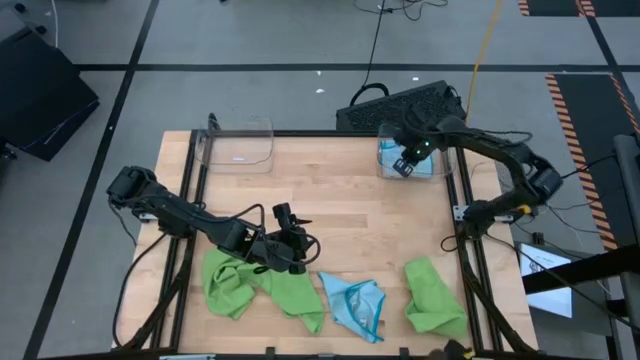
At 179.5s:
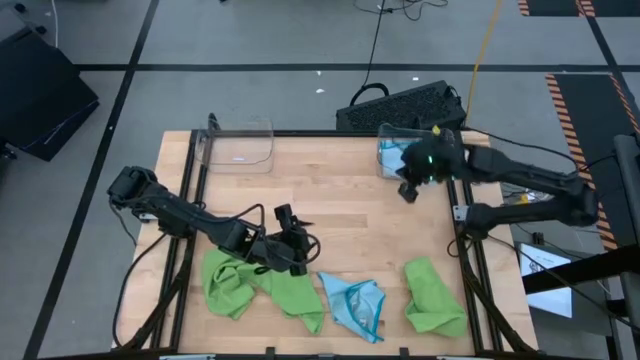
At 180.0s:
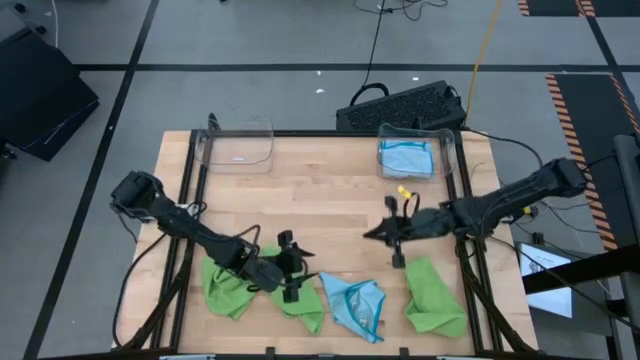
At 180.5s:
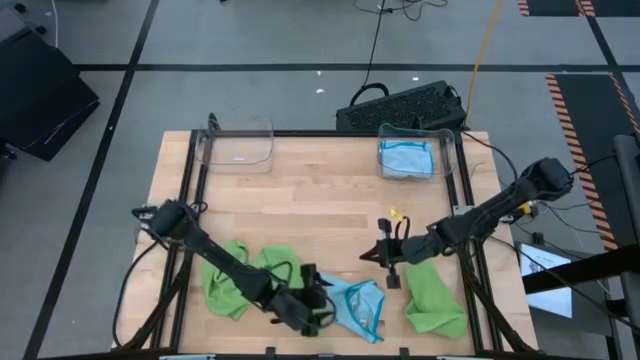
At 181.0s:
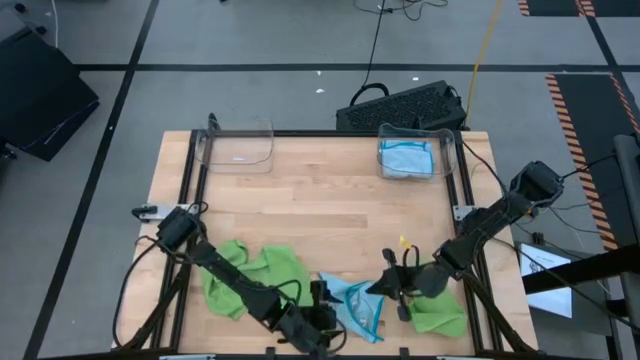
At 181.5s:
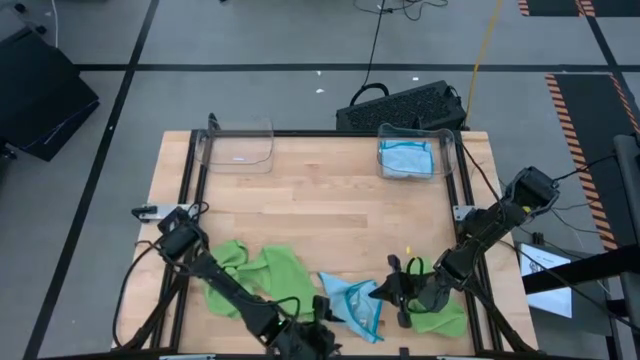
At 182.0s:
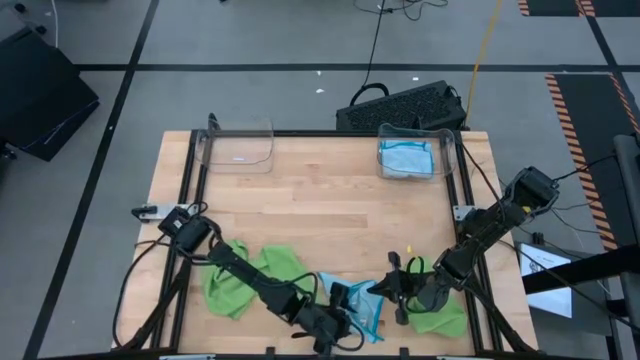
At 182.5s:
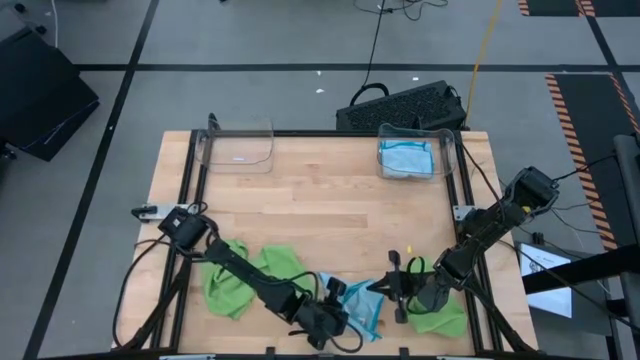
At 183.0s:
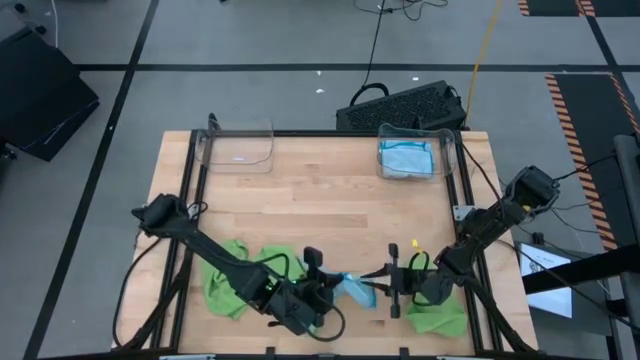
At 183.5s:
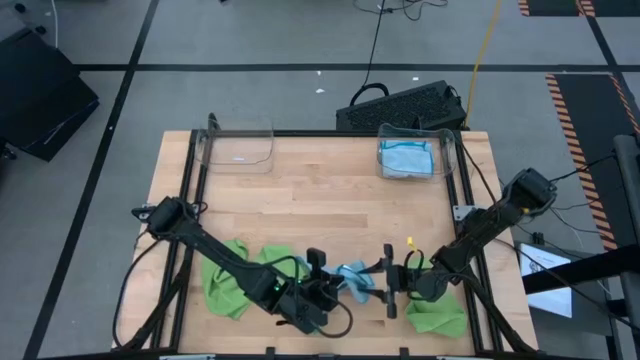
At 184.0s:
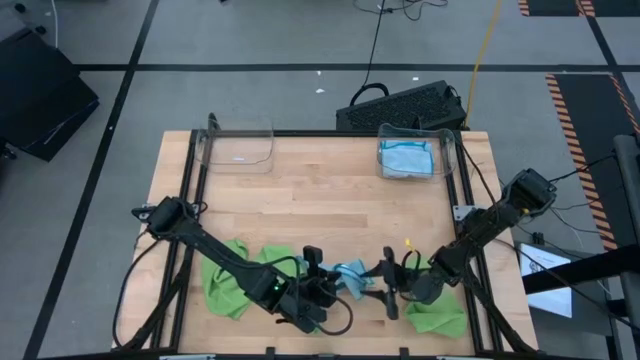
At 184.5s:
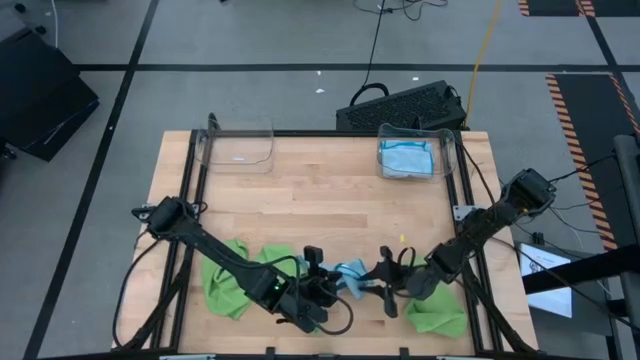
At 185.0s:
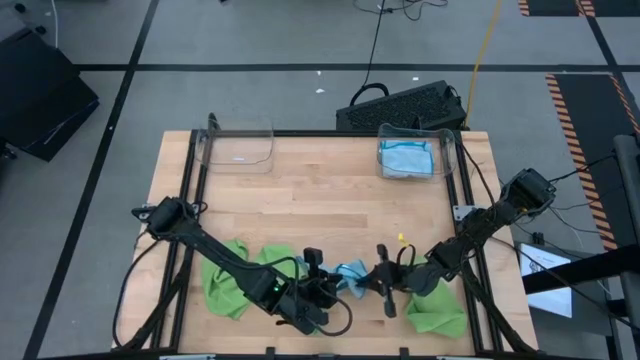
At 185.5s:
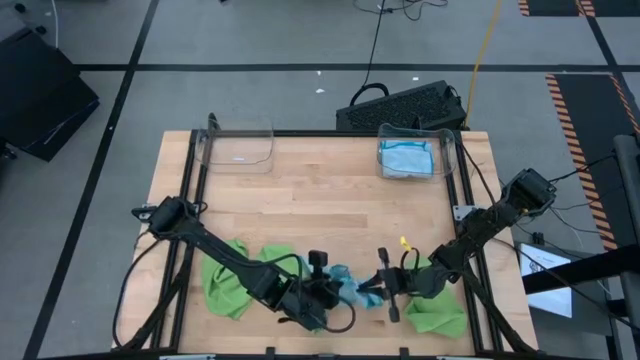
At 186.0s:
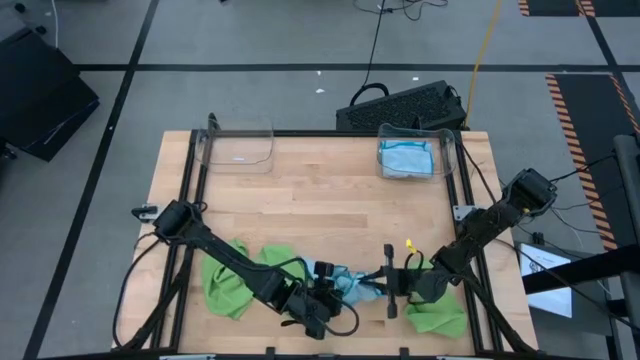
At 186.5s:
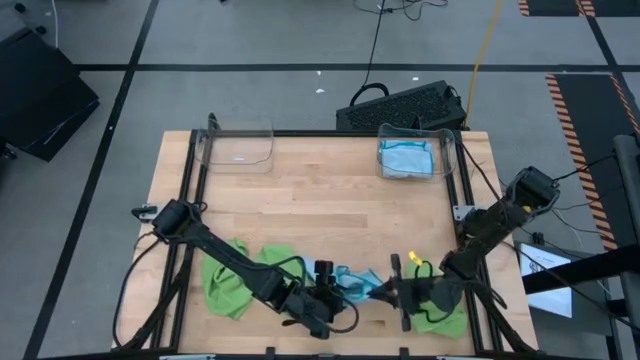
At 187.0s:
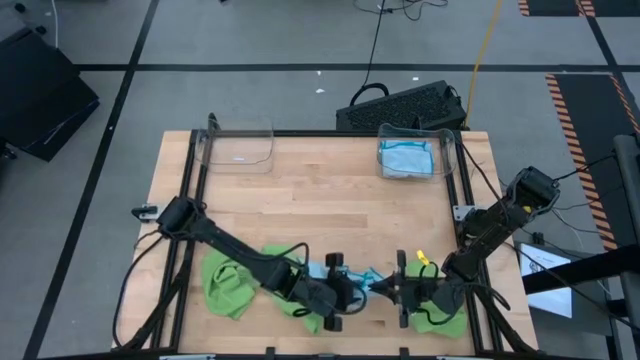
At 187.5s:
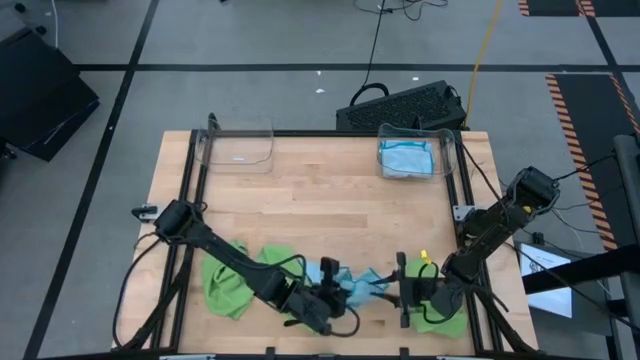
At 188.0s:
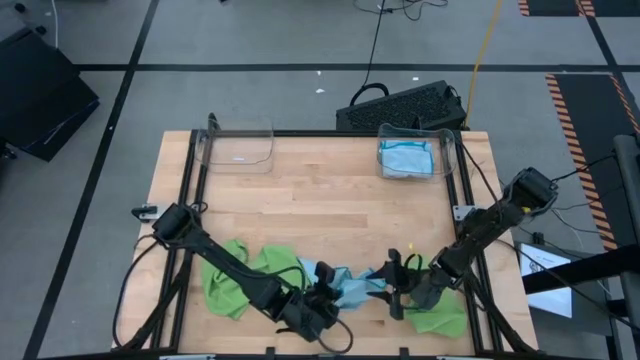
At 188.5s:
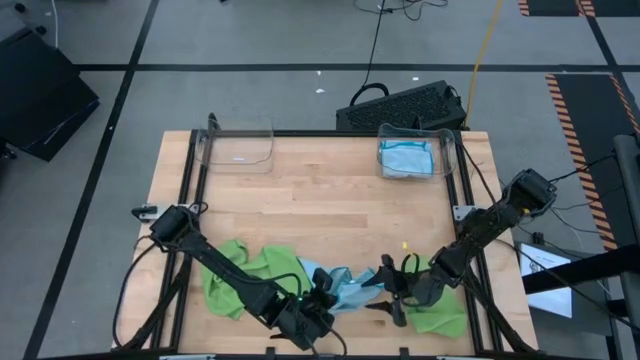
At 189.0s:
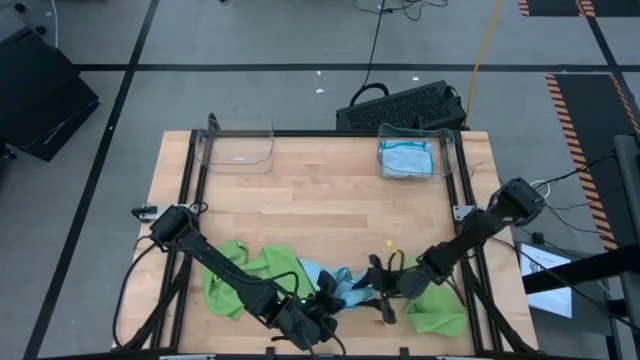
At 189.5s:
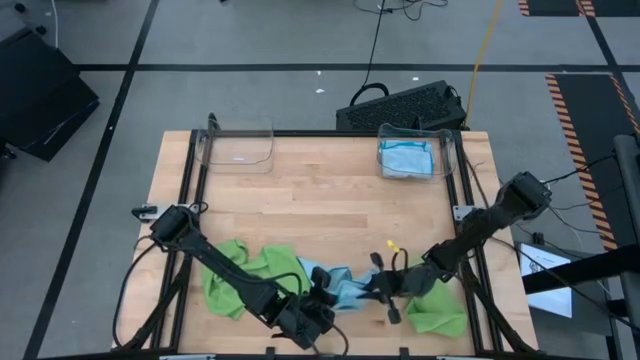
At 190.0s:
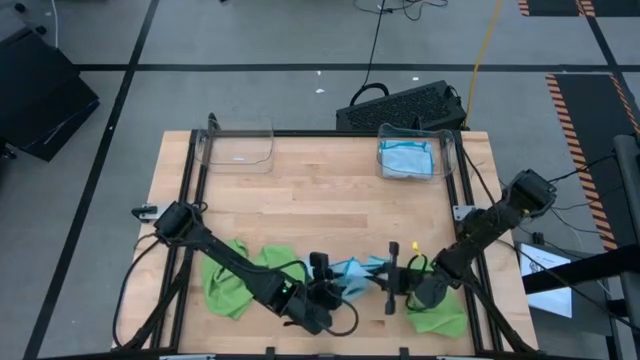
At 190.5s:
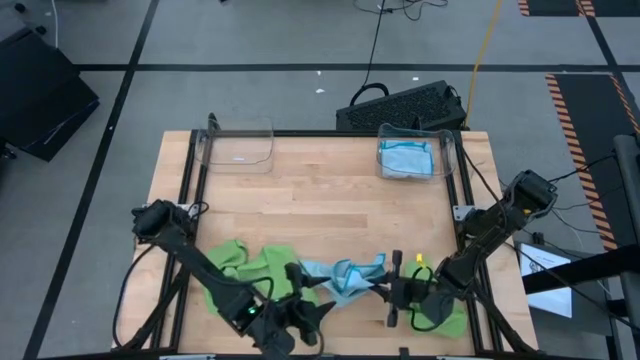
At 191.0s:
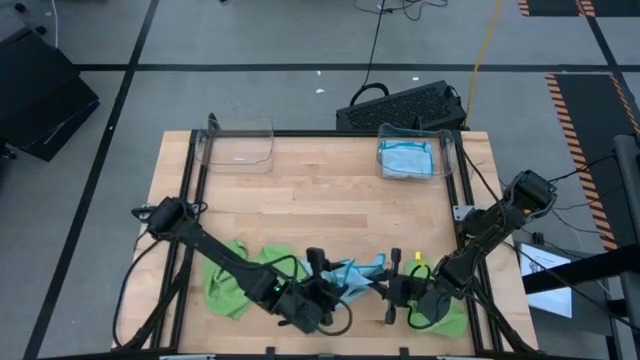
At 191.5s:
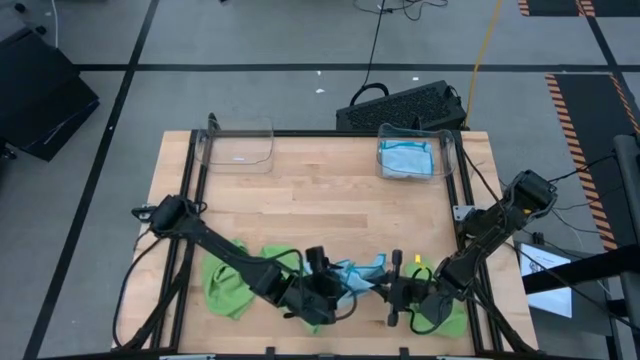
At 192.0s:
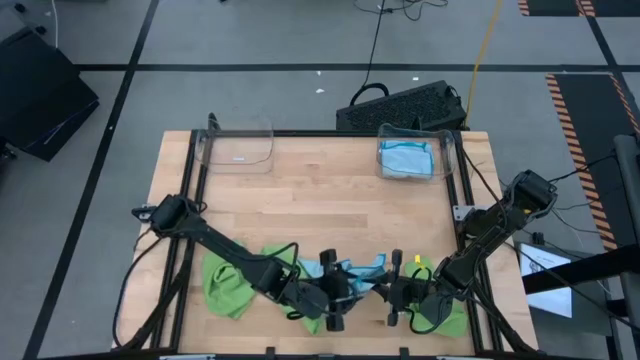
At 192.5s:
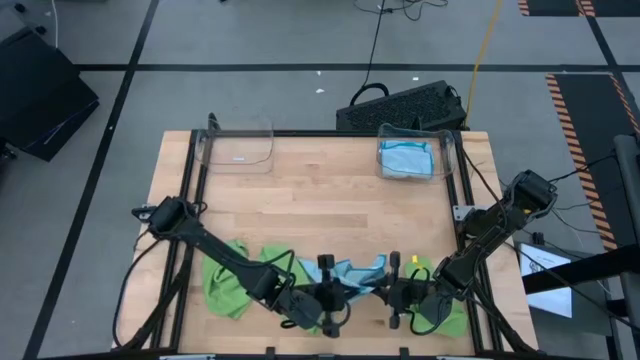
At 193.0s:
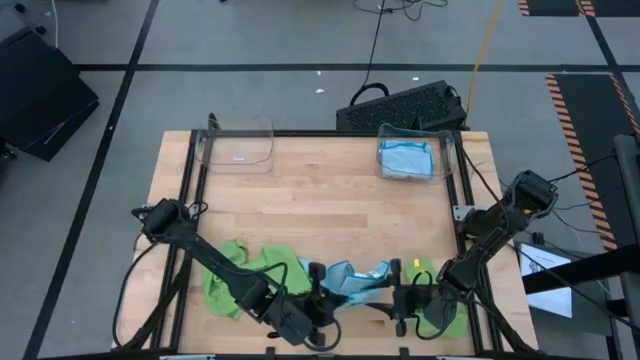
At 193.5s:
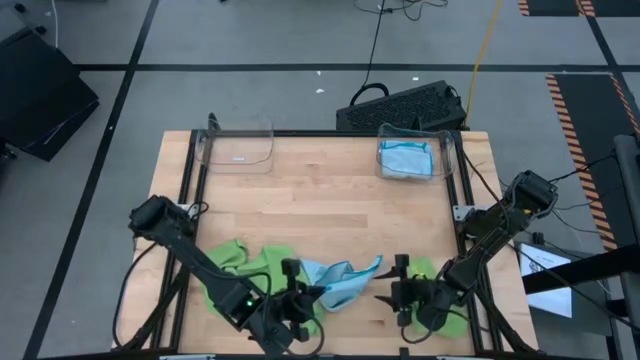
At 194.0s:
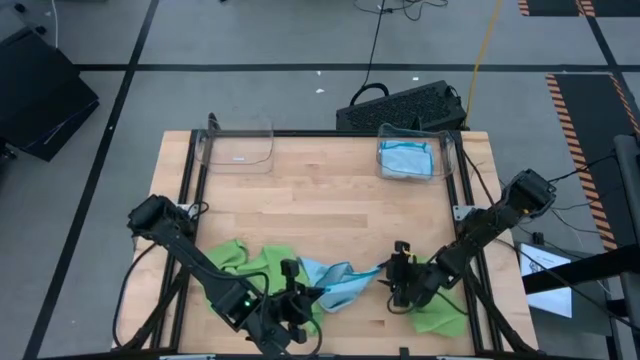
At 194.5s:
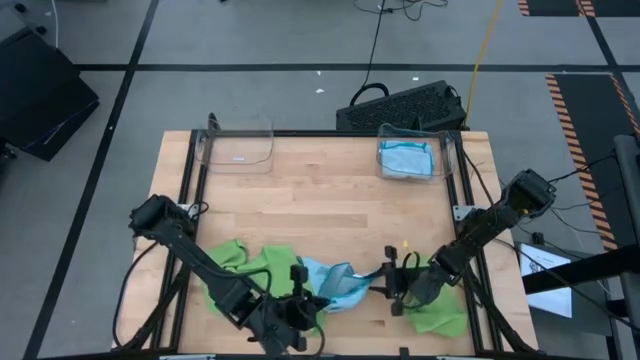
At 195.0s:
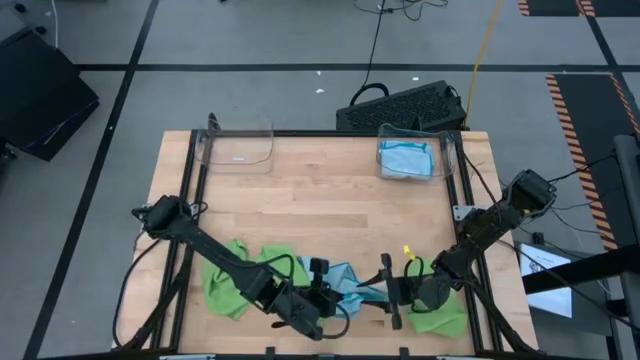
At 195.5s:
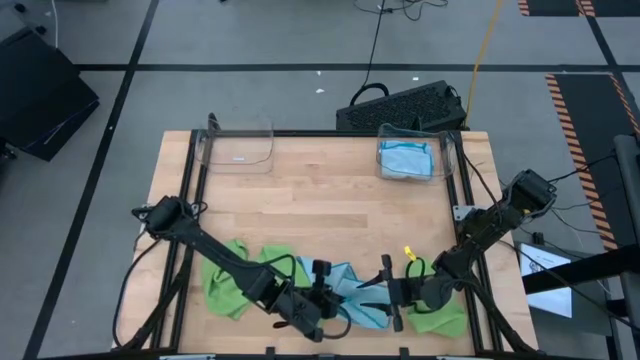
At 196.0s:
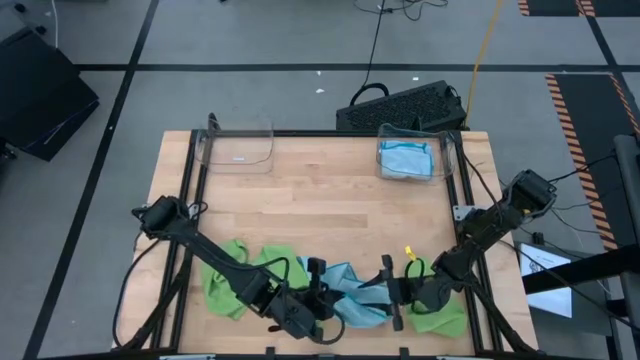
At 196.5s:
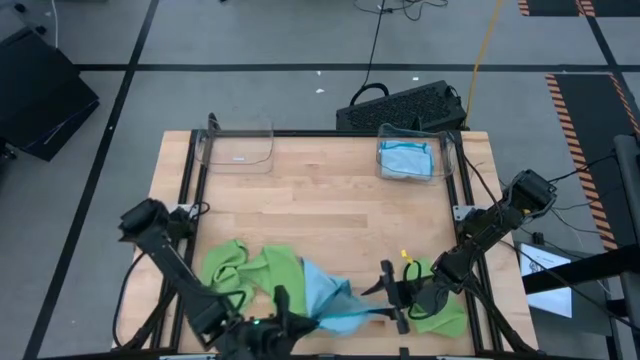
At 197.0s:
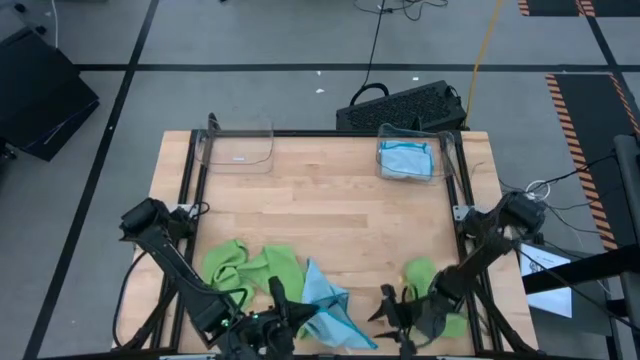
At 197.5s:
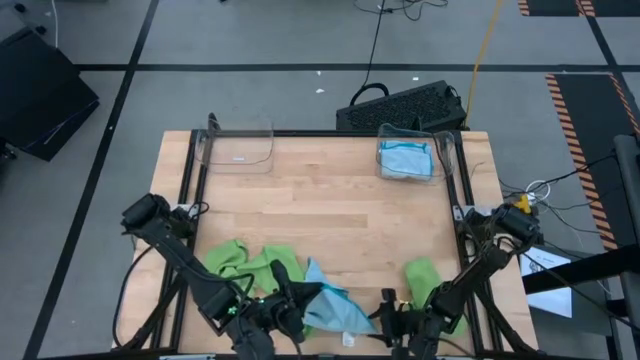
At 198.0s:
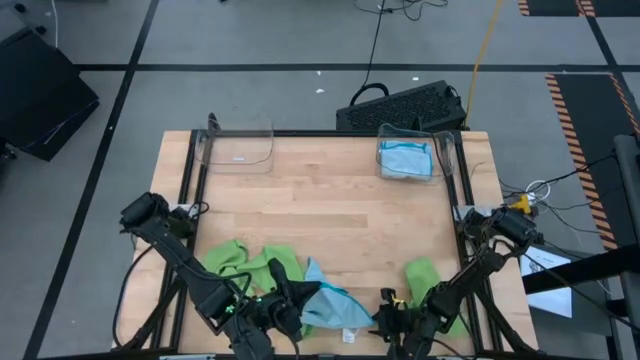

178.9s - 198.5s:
Task: Fold microfiber towels
Fold the blue microfiber cloth

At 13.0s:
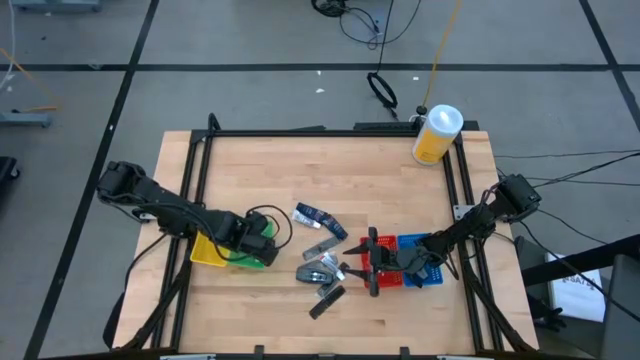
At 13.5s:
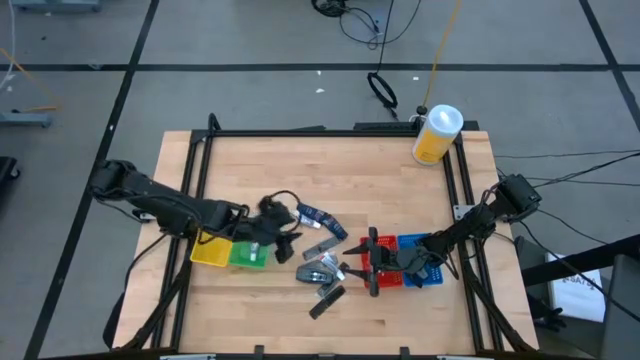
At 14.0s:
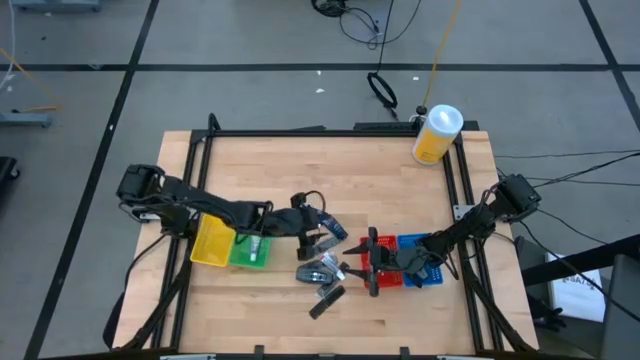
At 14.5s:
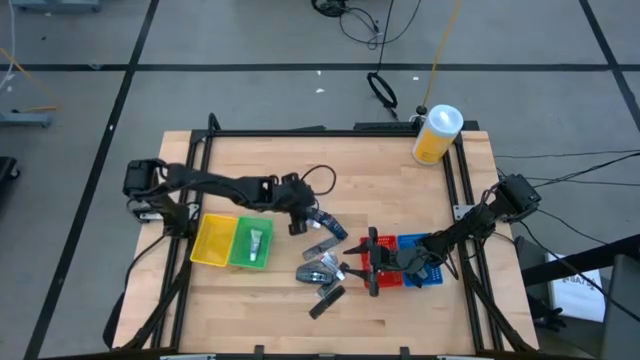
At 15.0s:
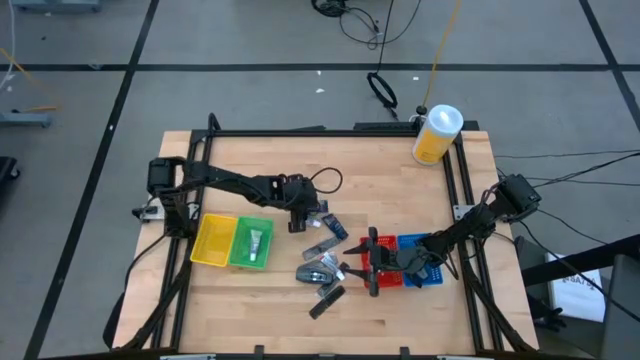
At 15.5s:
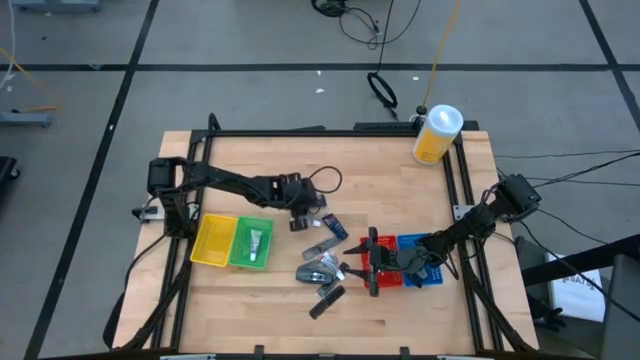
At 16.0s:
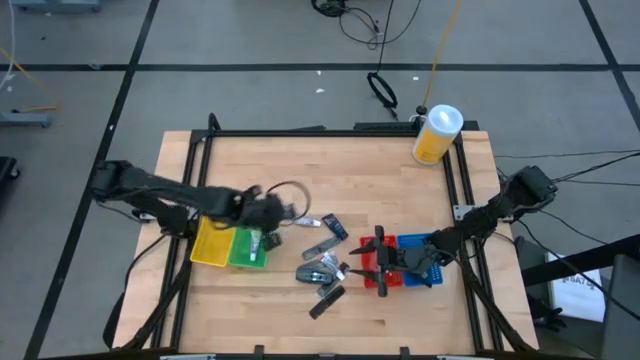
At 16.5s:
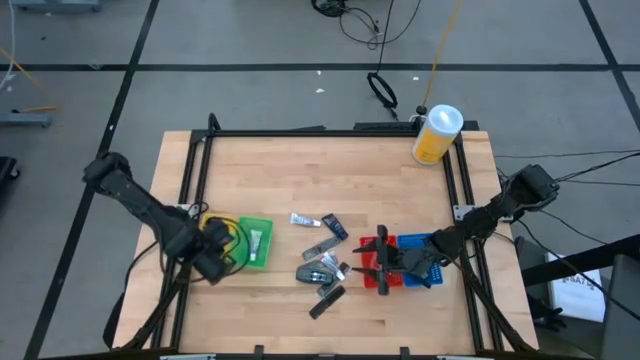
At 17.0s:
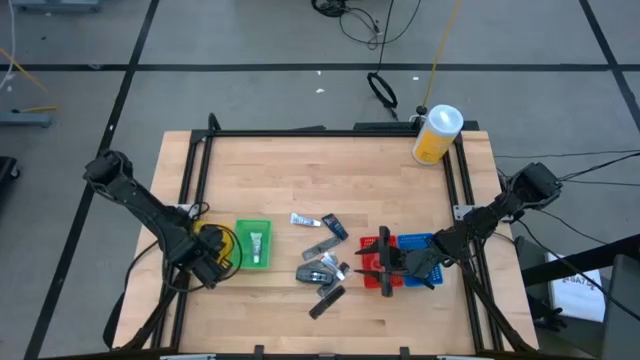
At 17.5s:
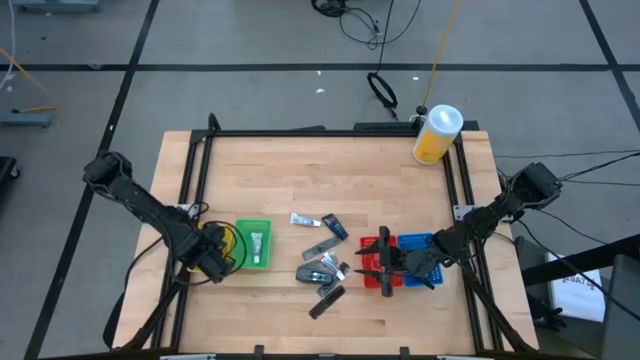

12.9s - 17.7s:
Task: Pick & Place Travel size toiletries
Put the blue shave cream into the yellow bin
